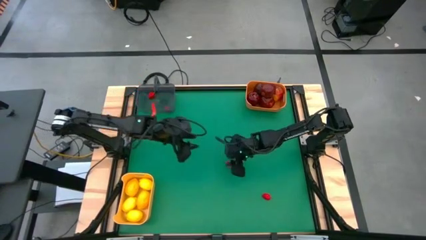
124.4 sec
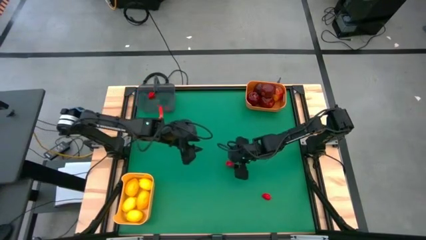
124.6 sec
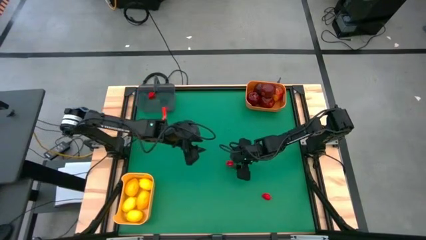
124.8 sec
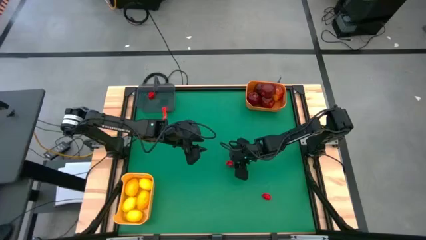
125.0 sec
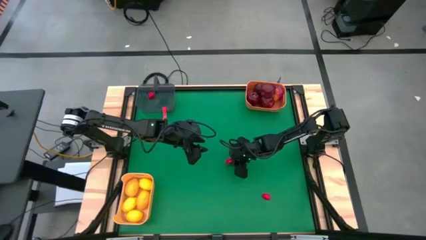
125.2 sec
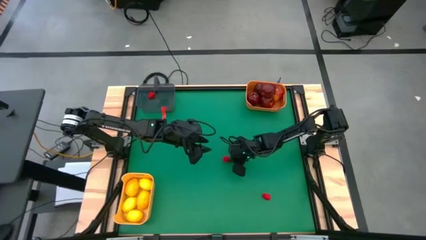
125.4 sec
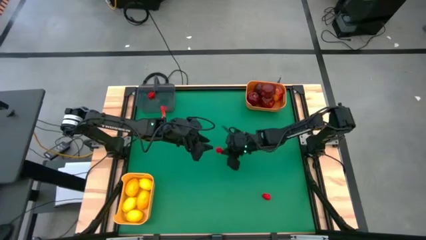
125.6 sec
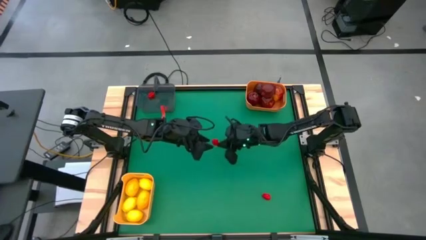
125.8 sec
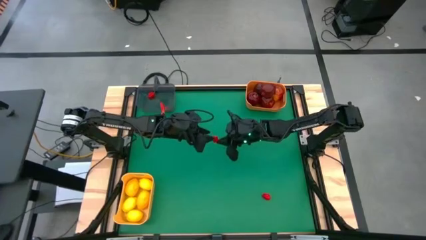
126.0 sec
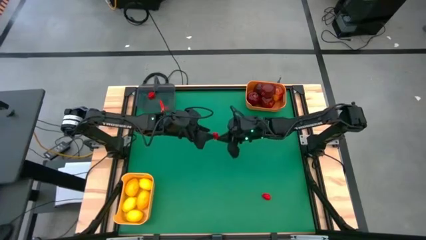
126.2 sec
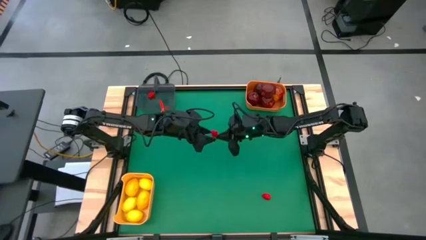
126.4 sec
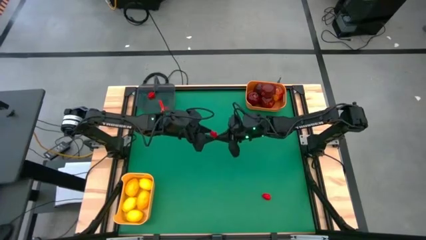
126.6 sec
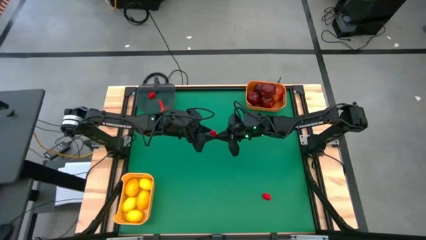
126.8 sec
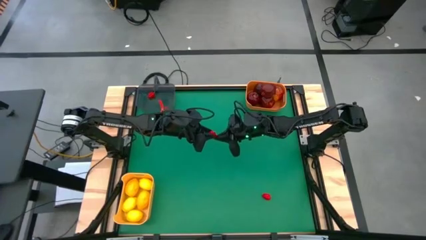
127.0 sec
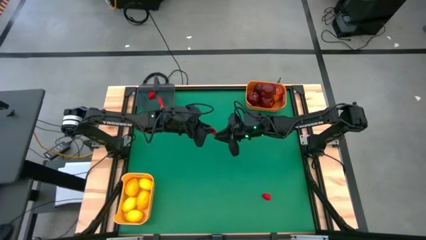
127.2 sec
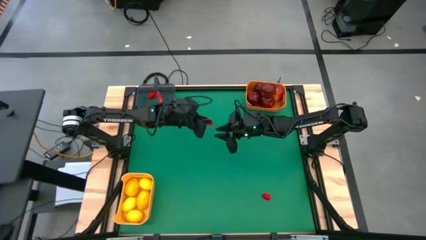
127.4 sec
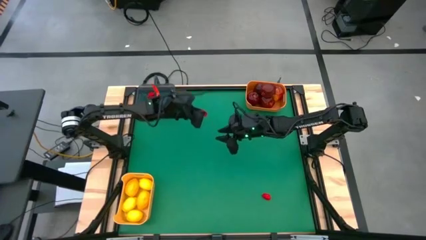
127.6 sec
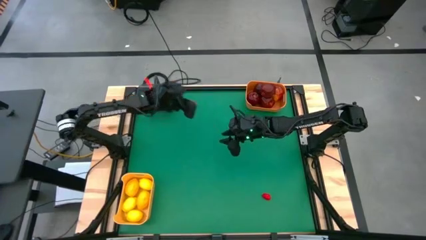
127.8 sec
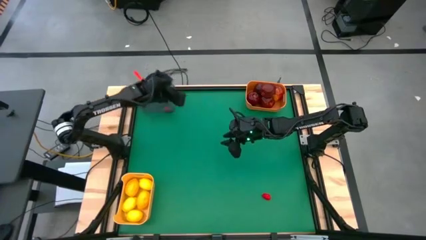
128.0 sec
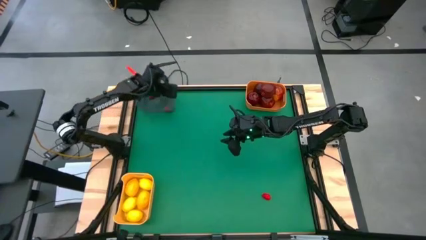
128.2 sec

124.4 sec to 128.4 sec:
Task: Sort produce into baskets
Put the red chili pepper into the black bin

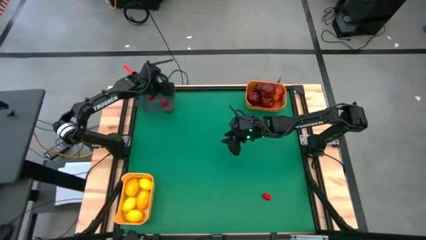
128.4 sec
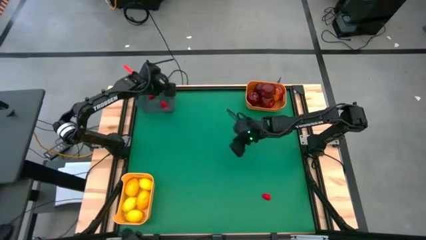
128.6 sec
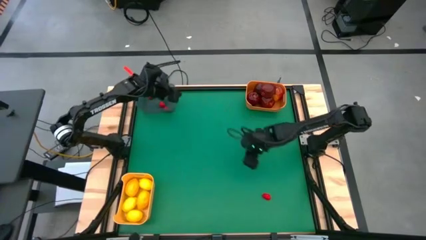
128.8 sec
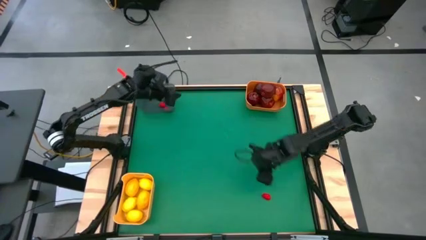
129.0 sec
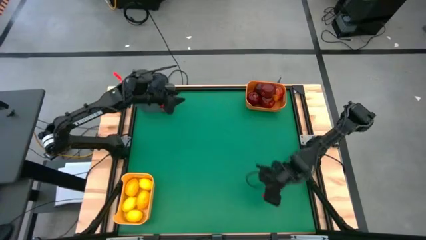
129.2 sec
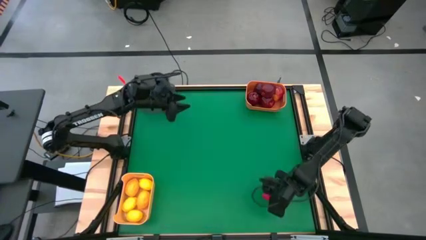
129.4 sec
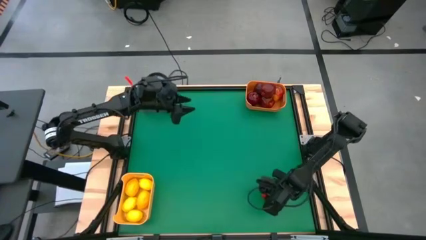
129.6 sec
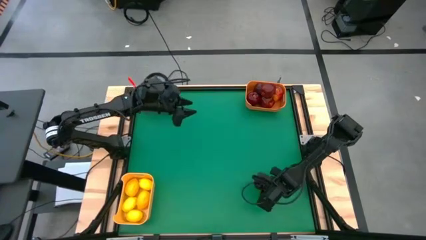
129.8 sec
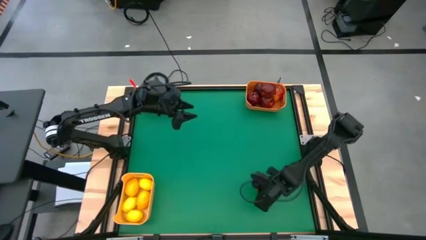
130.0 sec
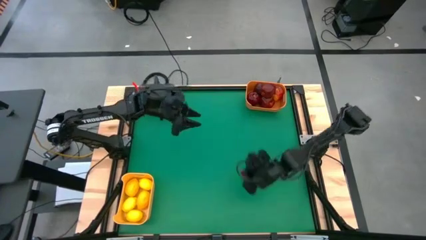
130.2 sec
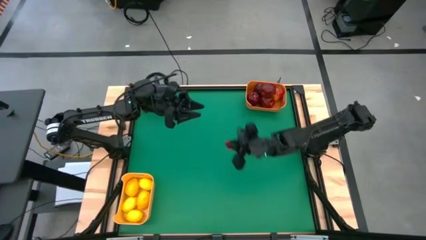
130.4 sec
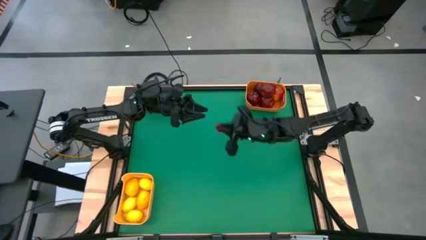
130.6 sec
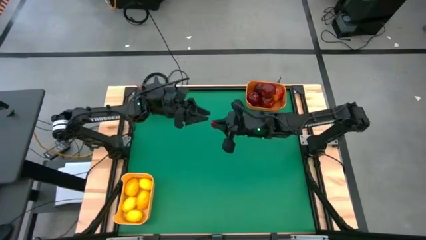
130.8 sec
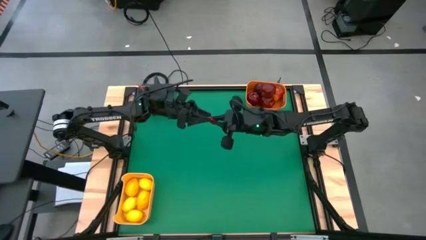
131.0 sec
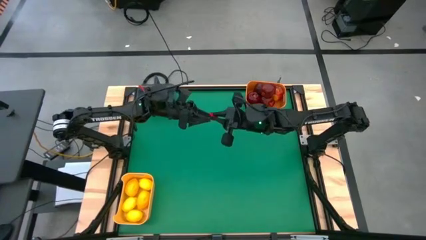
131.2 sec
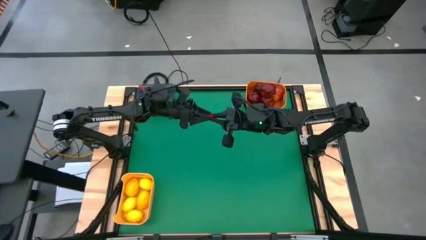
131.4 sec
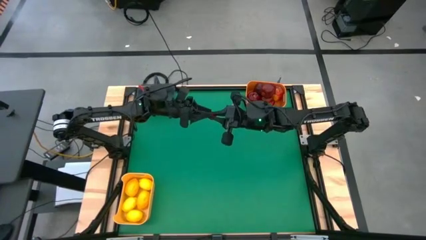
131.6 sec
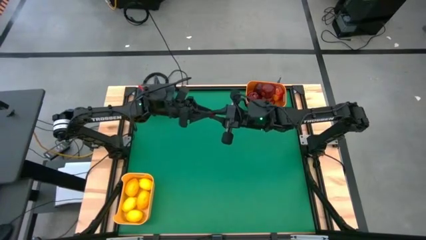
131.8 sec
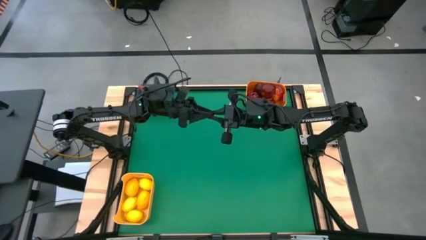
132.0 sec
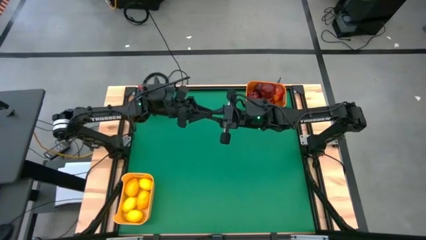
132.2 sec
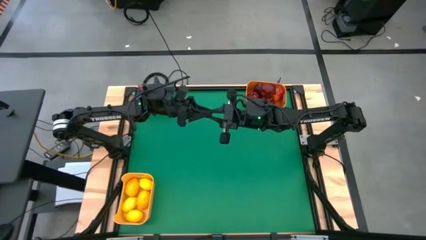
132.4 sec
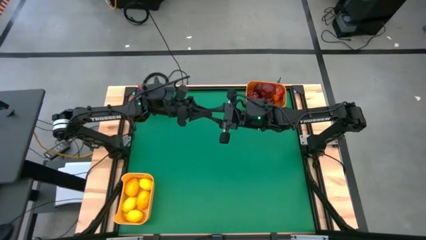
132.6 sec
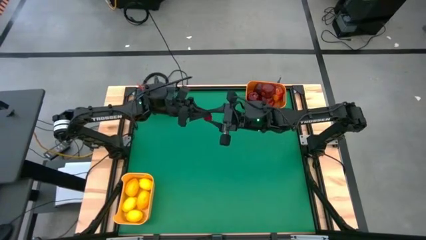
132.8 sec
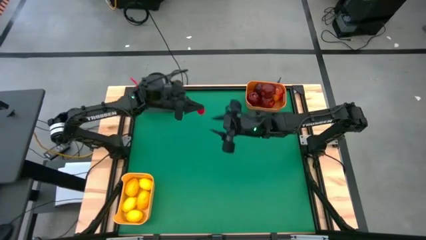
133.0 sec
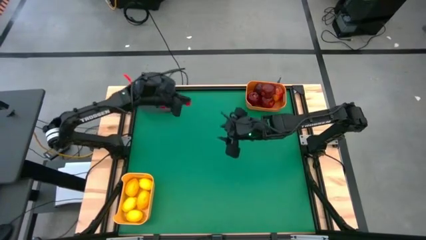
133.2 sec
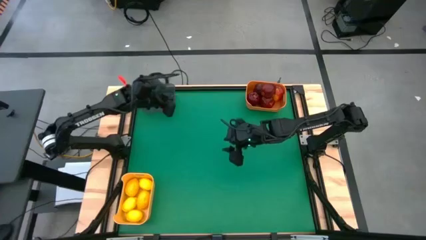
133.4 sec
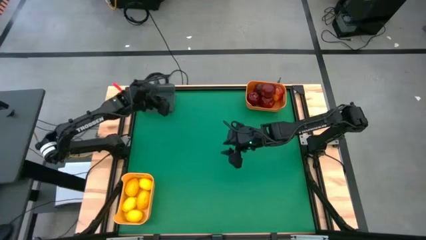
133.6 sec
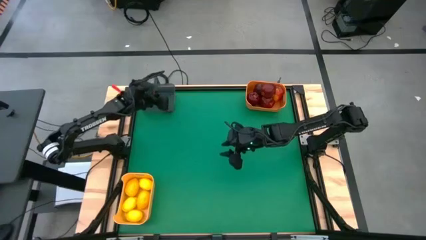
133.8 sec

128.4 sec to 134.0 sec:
Put the red chili pepper into the black bin

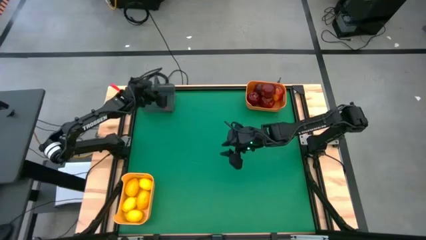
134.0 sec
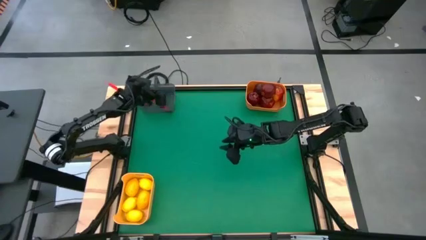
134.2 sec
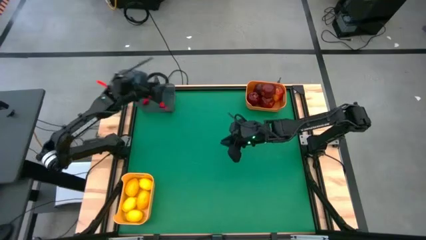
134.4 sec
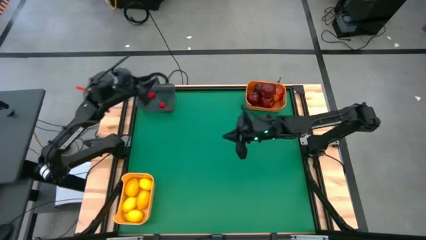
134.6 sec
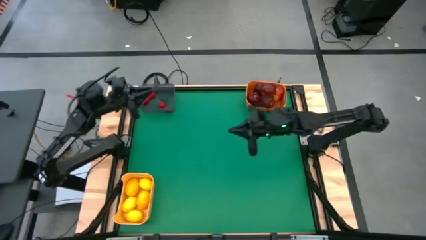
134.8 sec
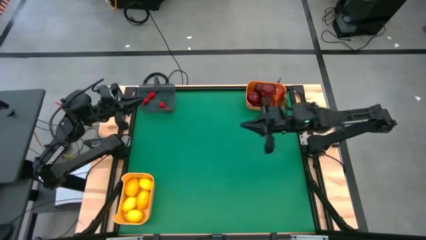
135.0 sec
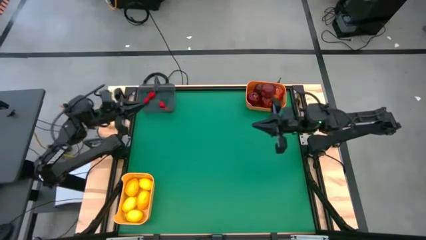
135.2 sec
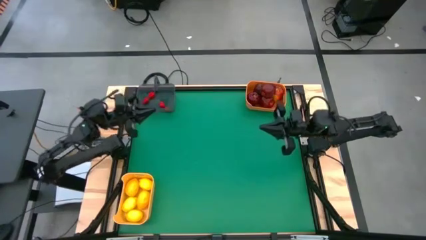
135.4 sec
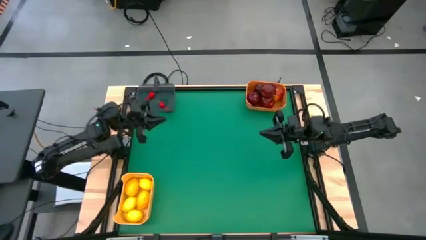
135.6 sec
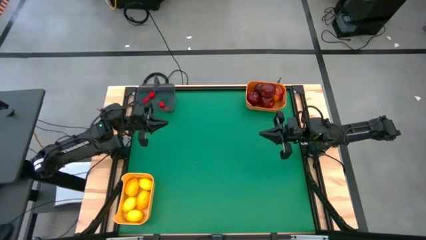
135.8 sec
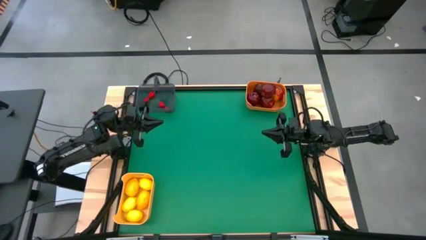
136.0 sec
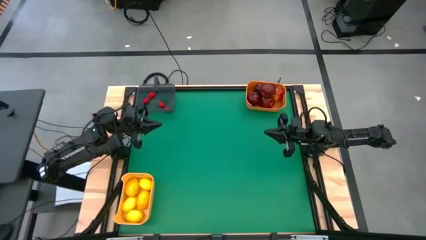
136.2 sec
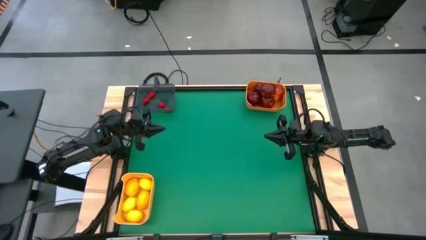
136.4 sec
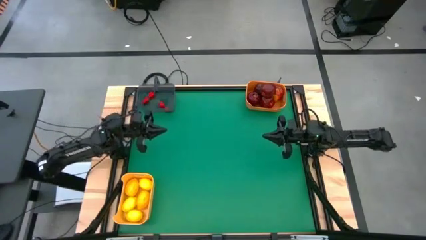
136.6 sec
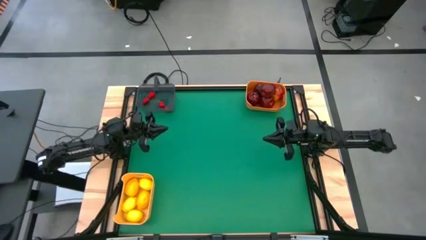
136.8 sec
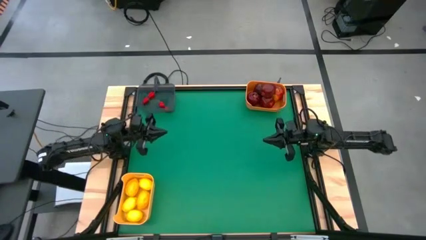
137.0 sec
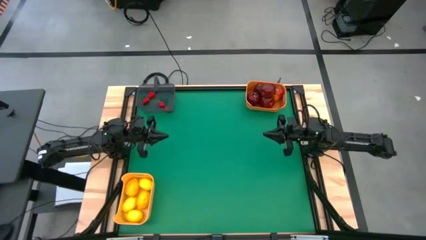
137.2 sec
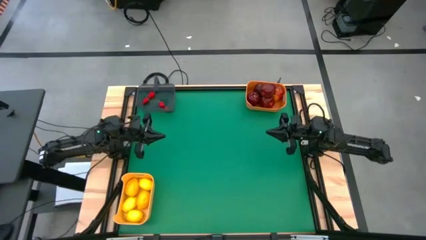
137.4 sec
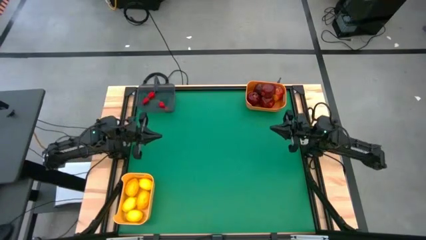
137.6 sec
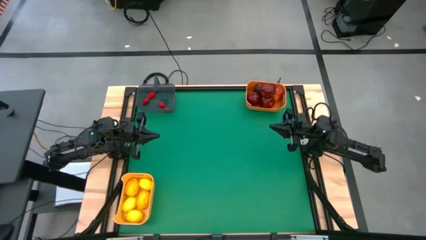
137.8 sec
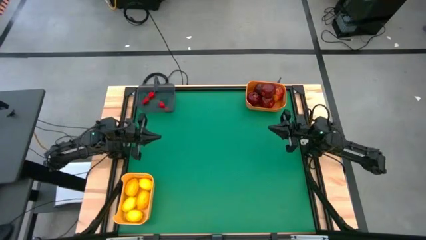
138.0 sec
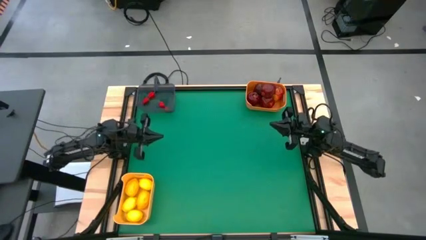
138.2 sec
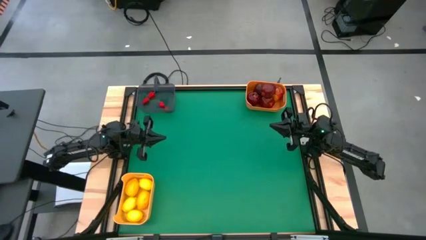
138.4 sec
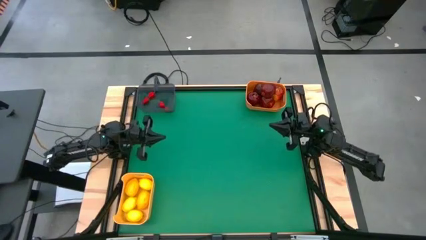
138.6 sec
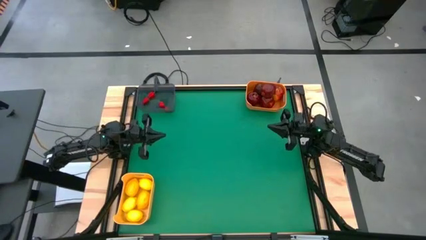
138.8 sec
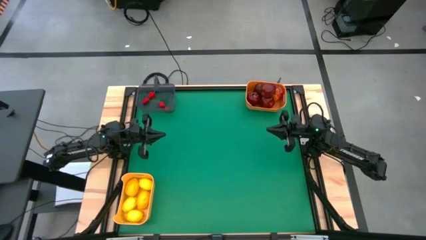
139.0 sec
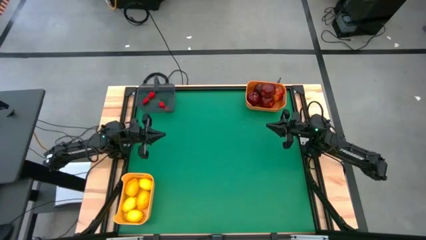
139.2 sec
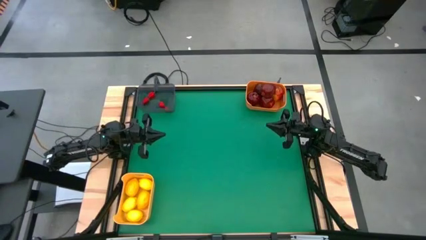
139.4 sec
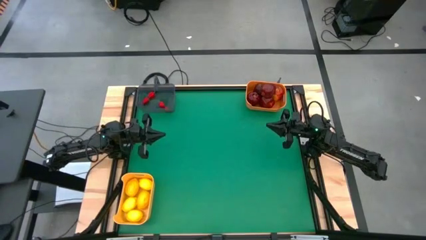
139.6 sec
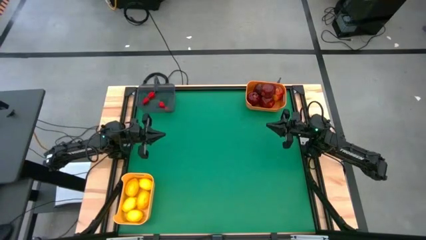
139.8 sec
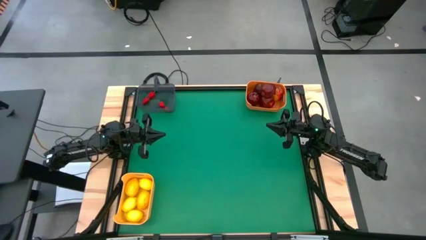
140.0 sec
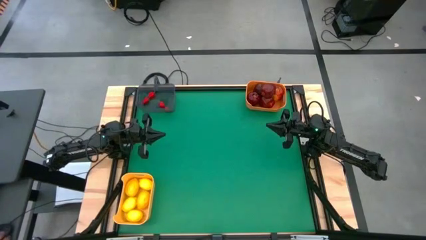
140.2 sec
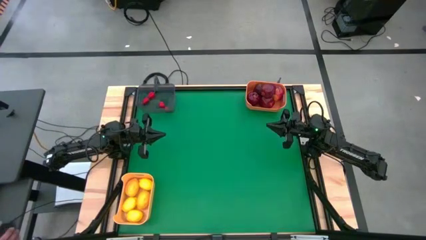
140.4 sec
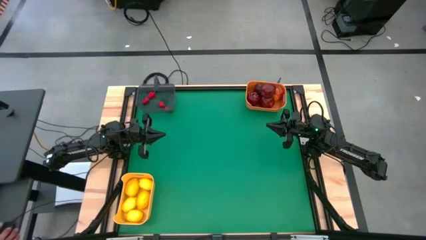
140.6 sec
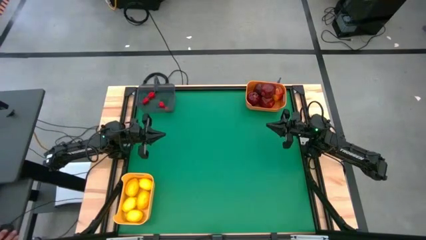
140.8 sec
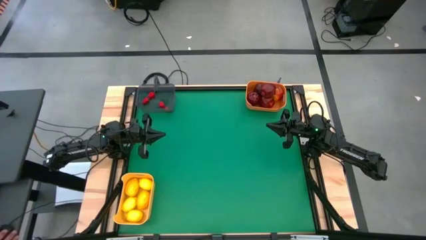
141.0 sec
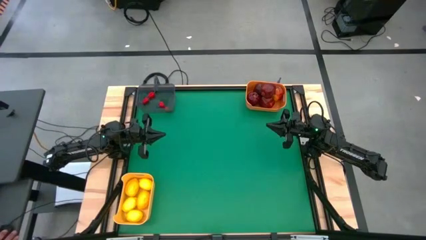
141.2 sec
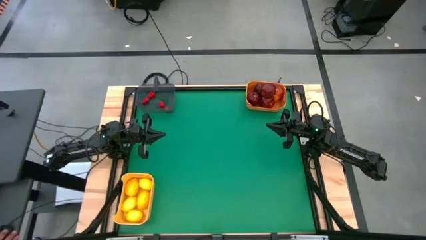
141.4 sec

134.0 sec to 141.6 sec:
Return to Home Position
